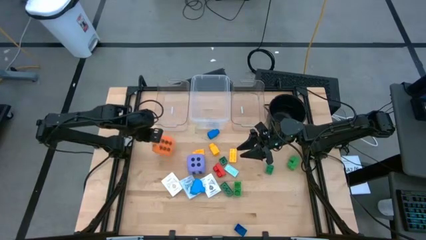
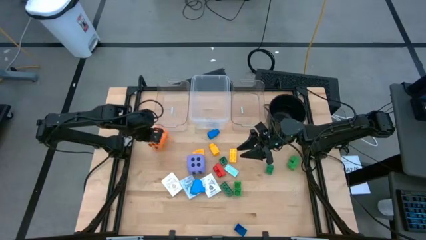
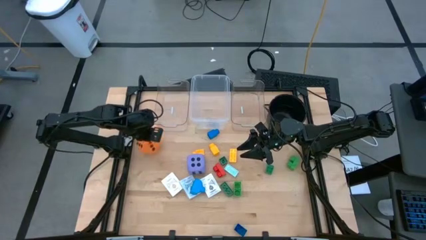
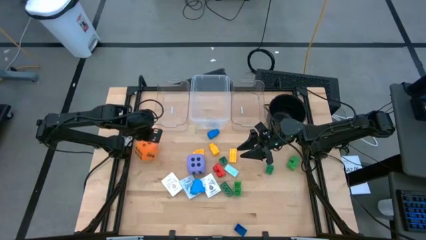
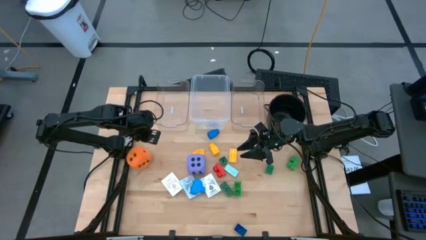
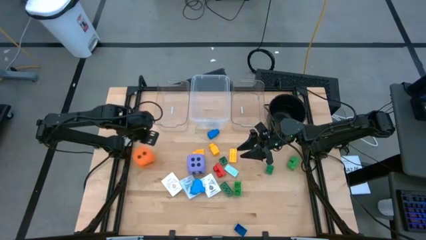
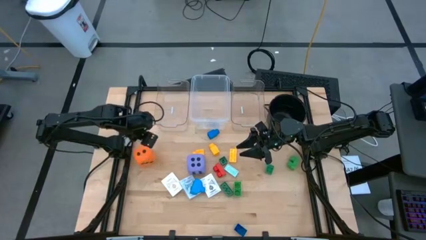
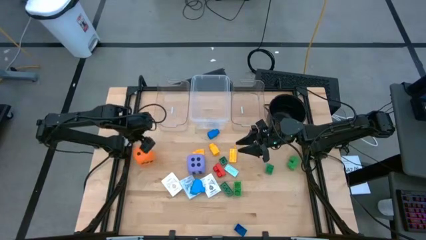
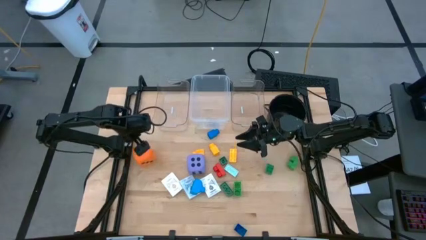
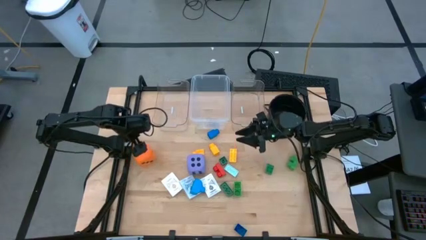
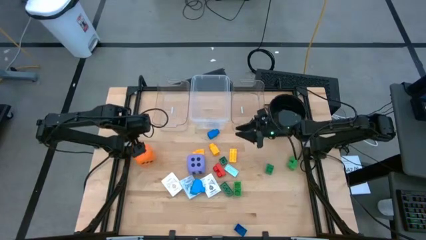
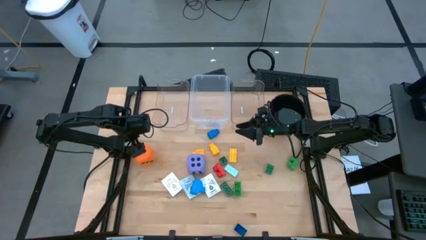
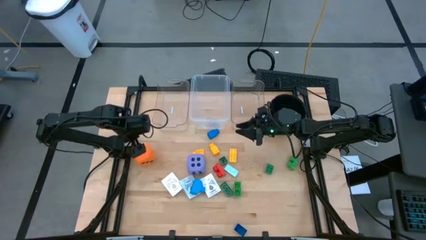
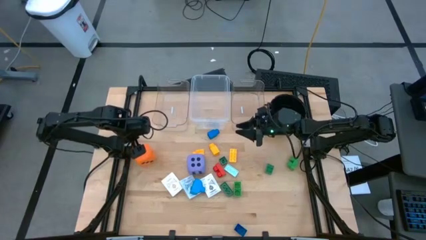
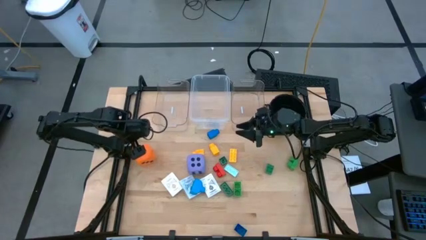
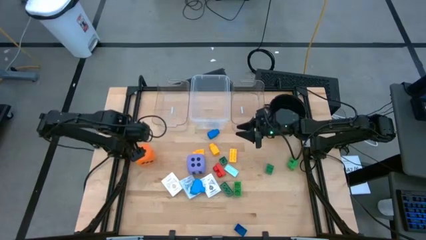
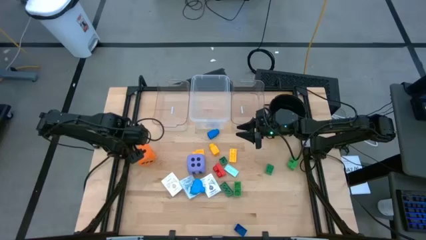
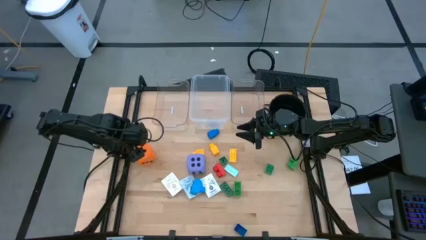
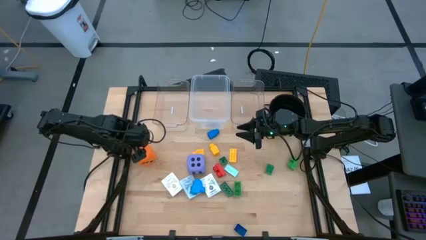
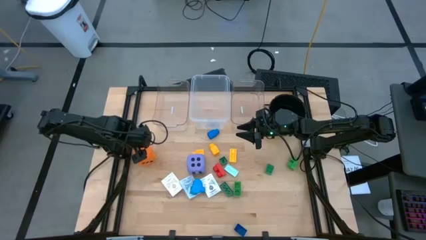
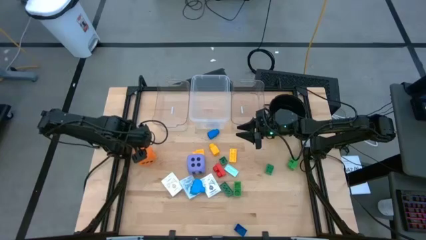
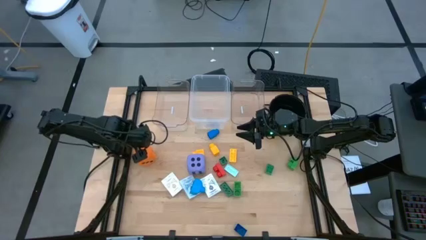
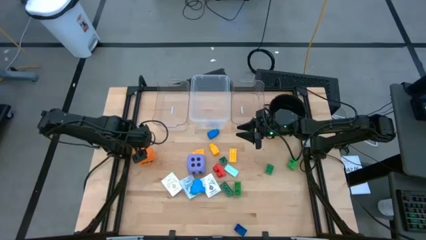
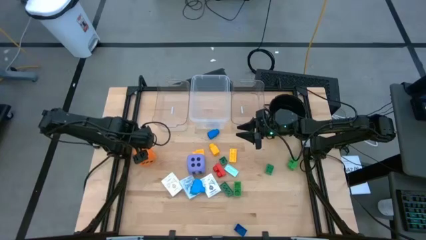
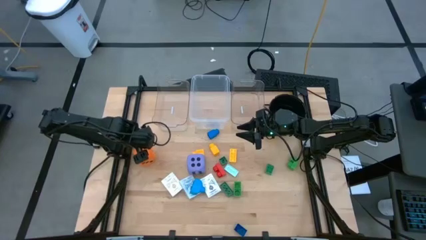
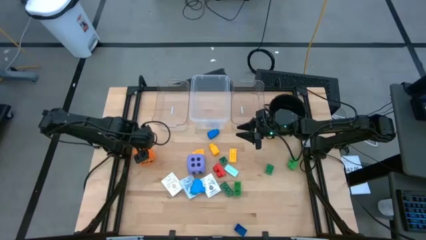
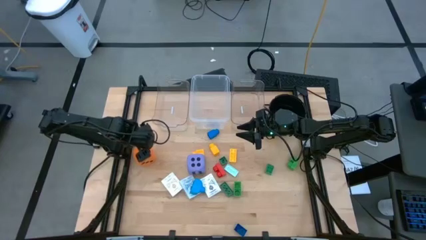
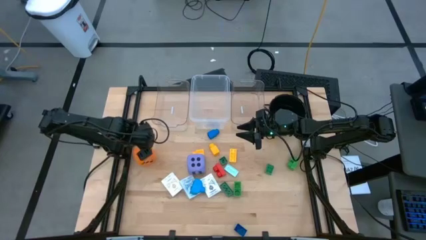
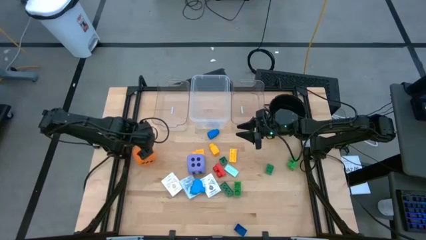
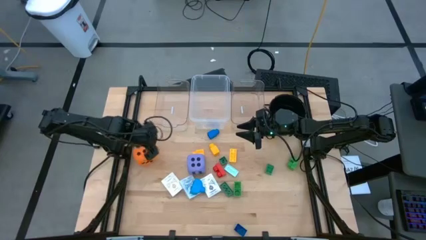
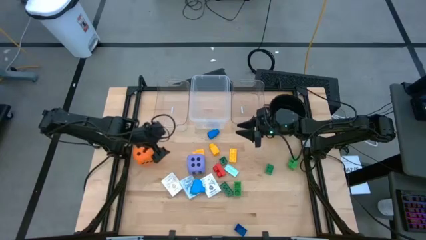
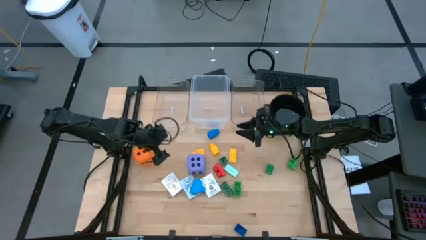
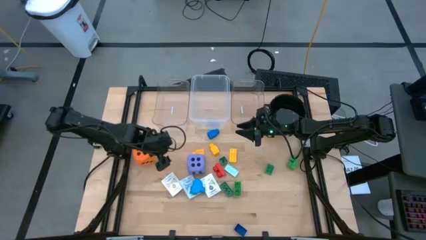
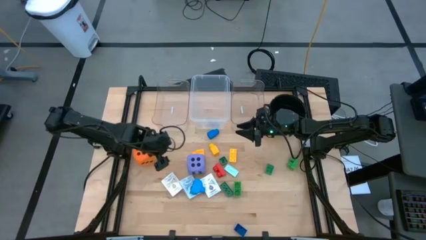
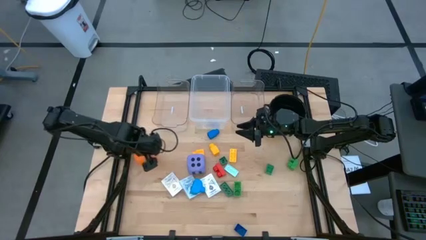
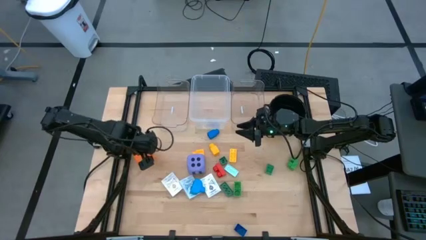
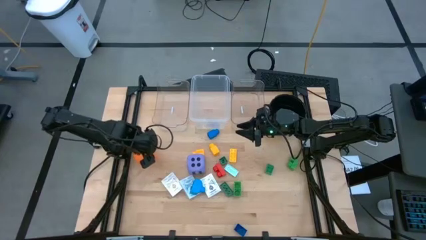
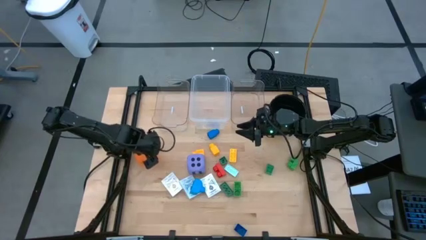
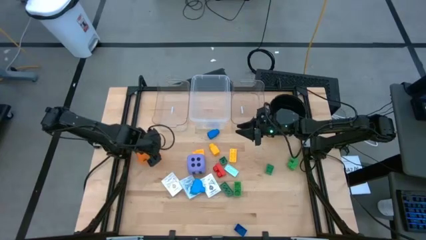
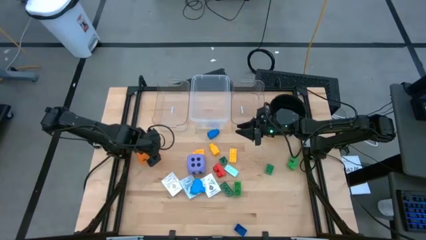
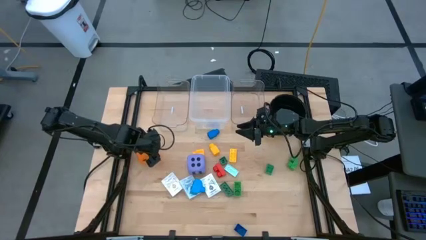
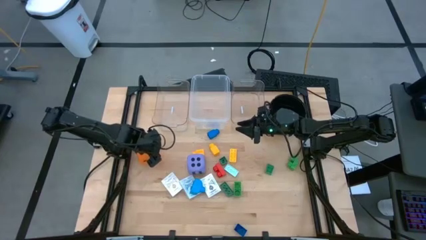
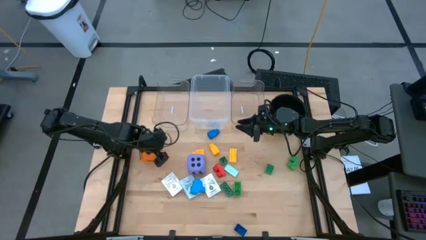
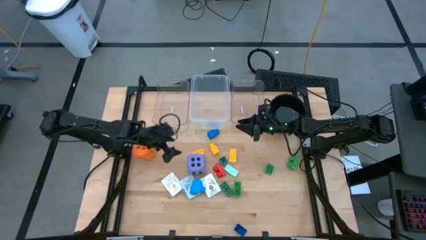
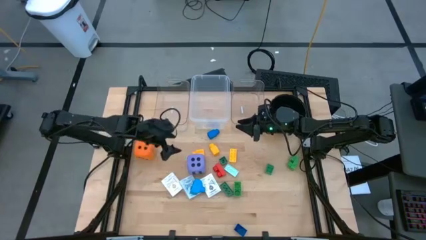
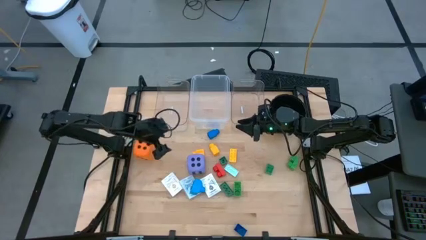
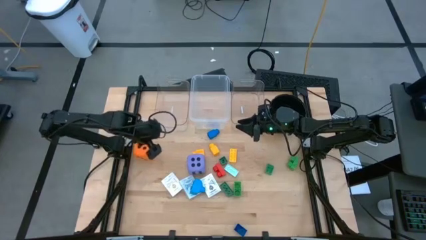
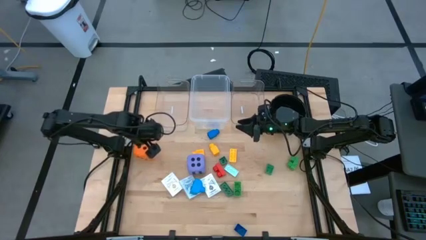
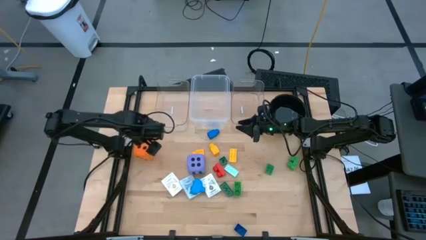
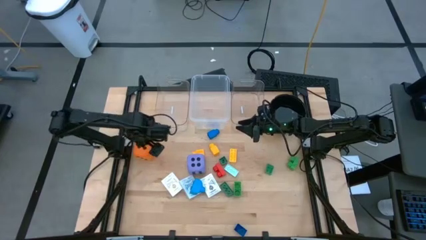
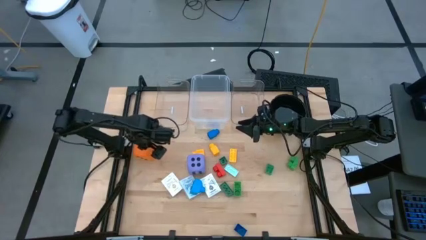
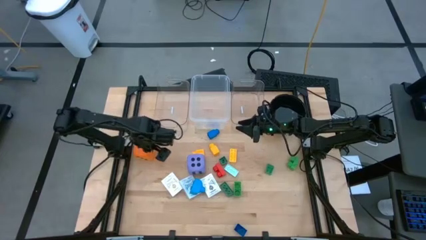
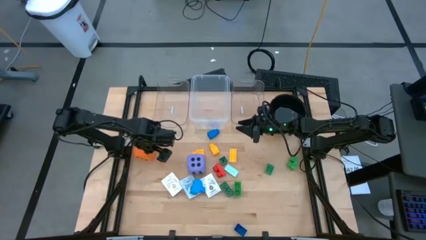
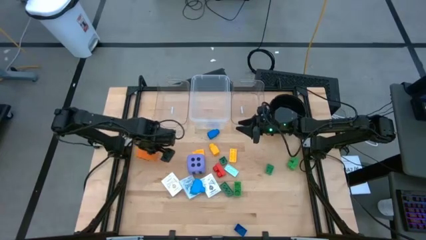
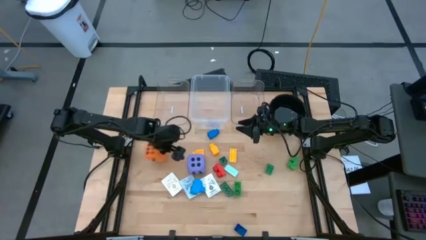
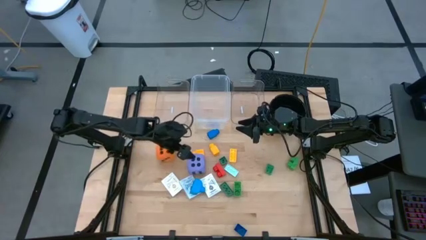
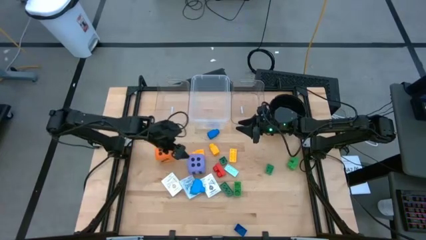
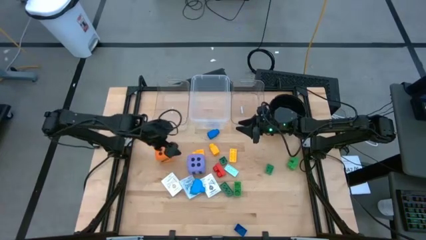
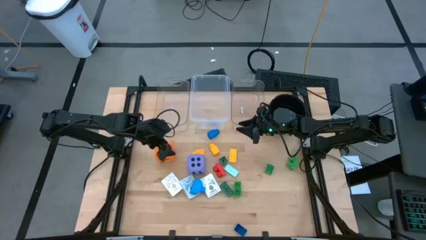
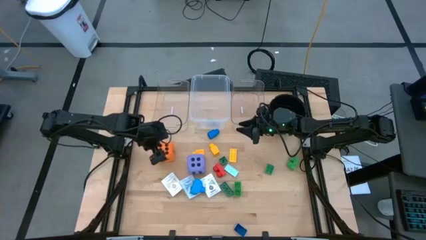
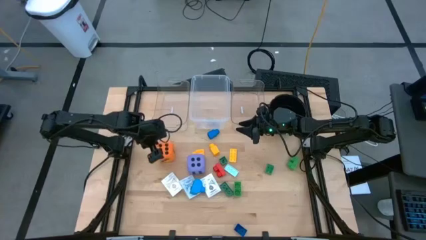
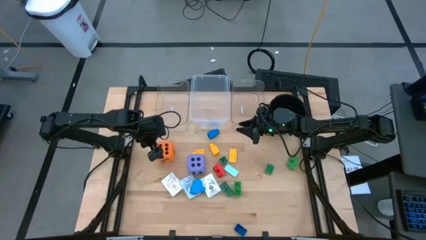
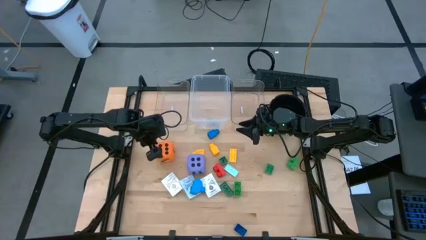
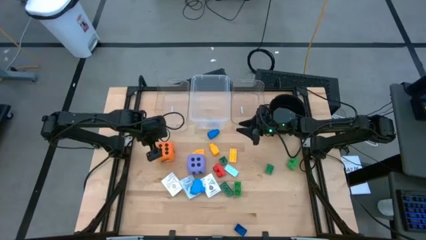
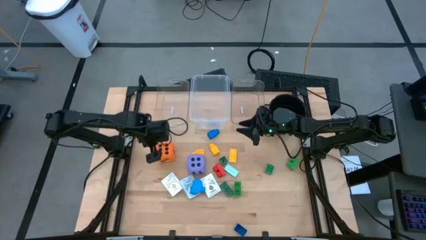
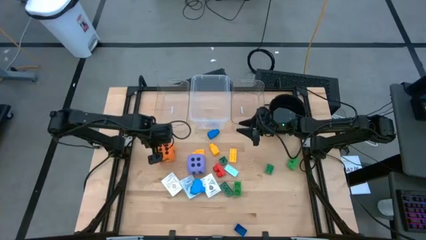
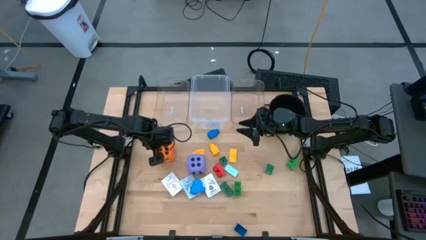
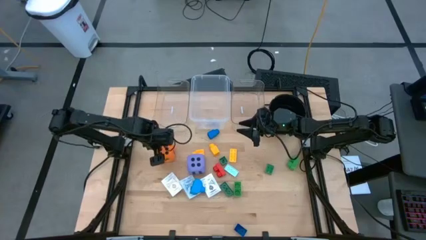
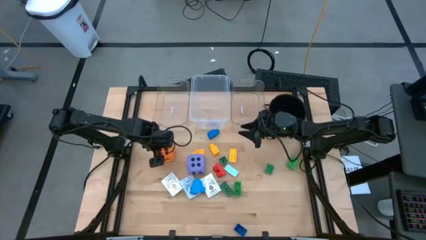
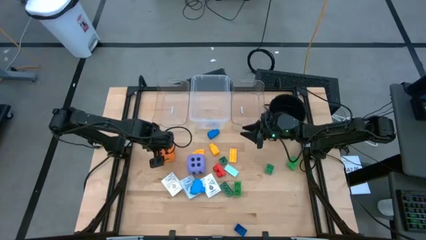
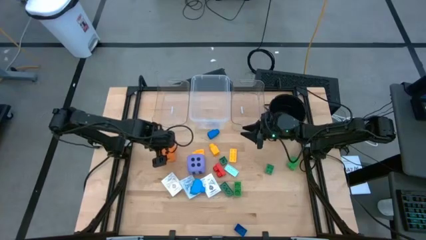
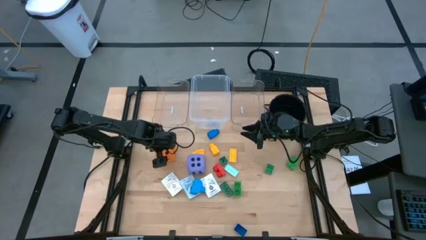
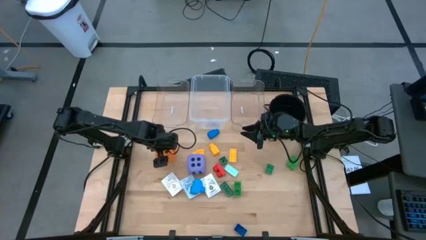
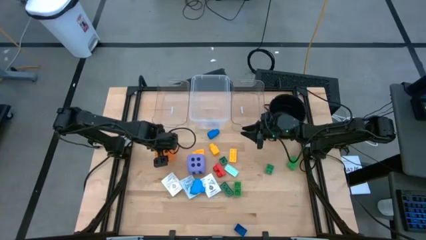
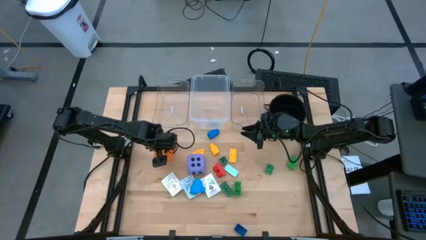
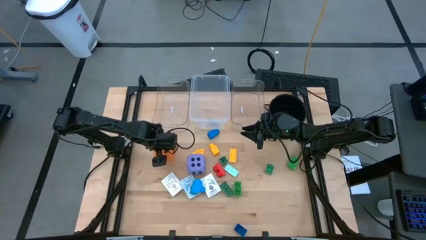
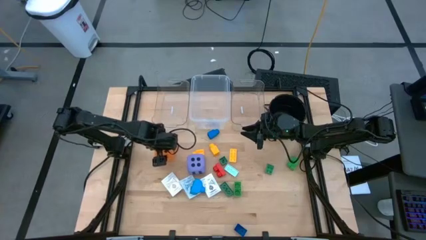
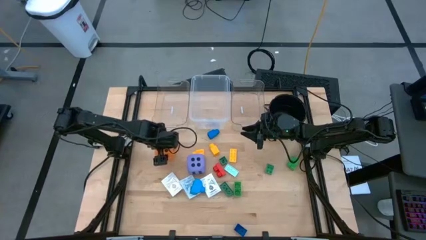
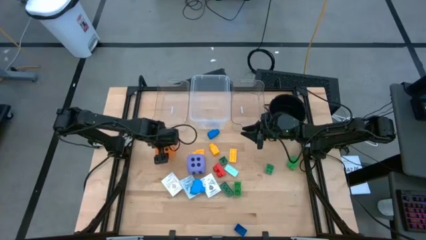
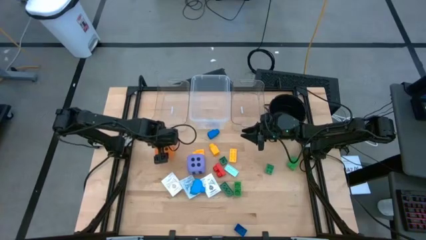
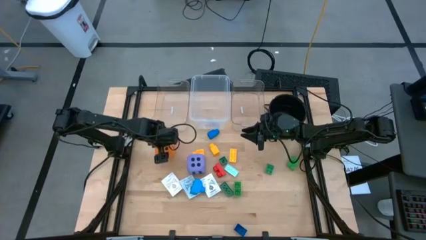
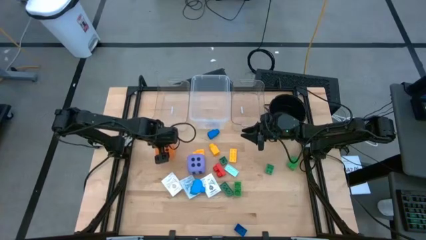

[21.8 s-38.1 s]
Task: Pick & Place Toys
Put the orange dice into the transparent container
